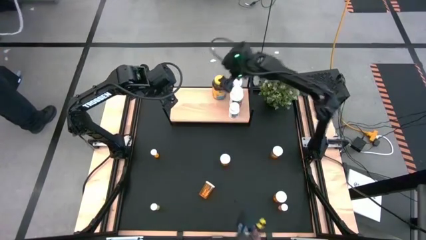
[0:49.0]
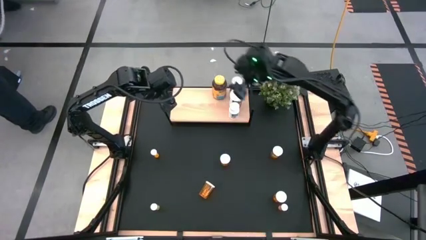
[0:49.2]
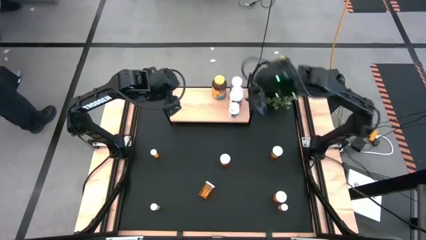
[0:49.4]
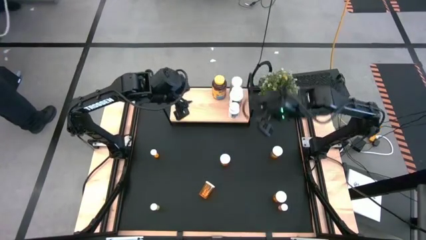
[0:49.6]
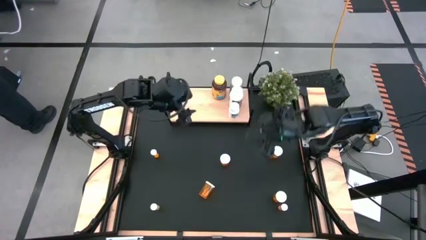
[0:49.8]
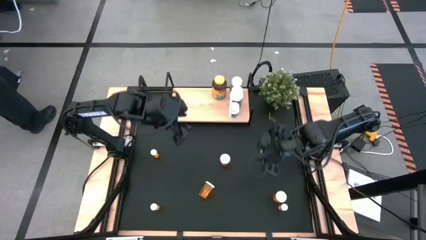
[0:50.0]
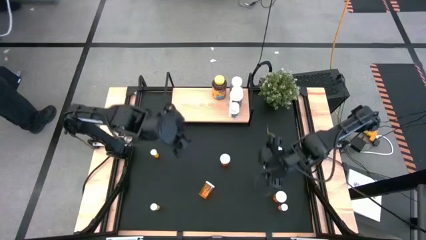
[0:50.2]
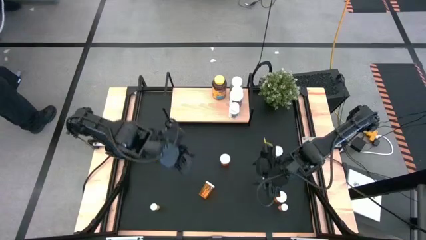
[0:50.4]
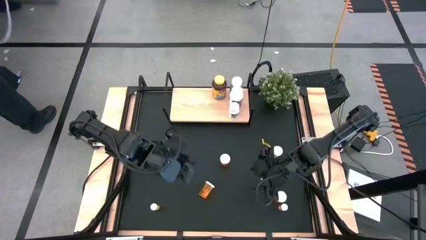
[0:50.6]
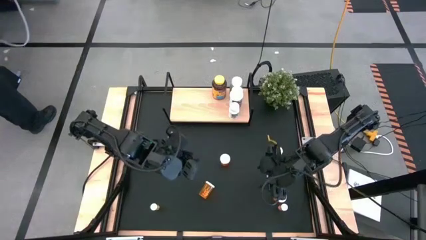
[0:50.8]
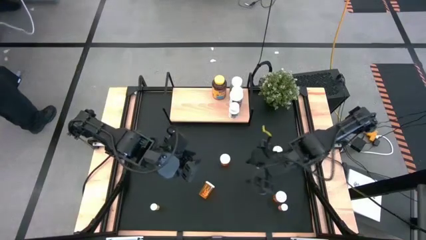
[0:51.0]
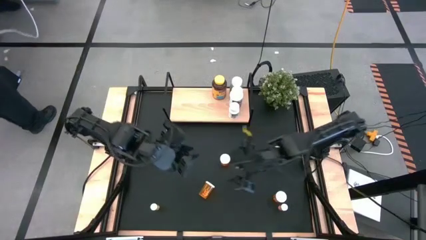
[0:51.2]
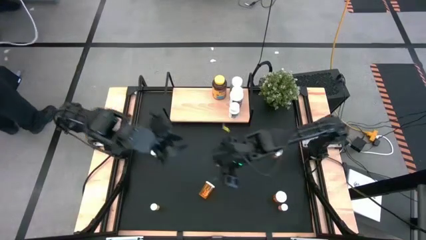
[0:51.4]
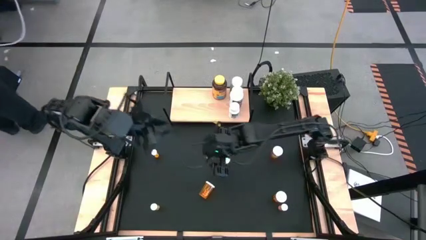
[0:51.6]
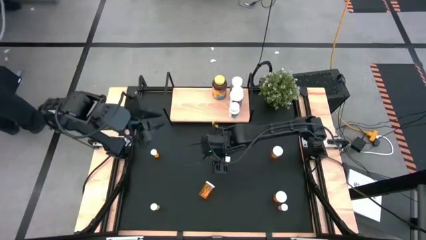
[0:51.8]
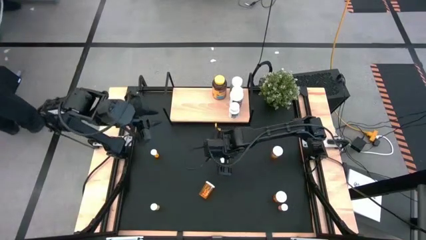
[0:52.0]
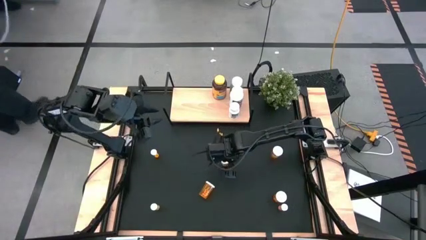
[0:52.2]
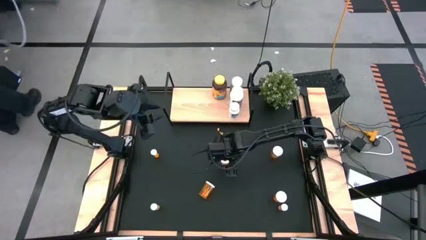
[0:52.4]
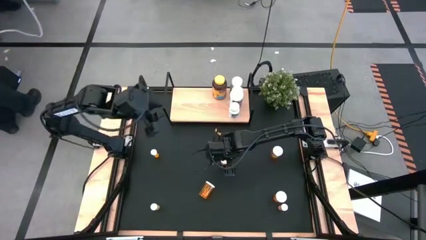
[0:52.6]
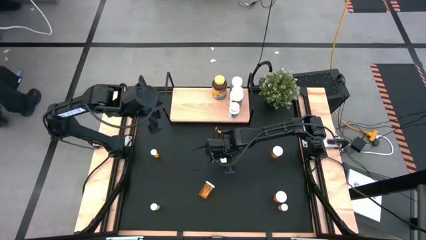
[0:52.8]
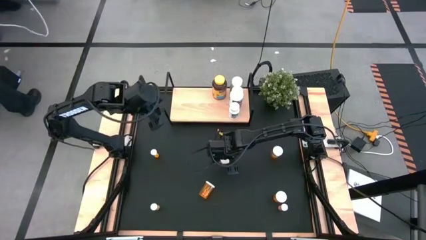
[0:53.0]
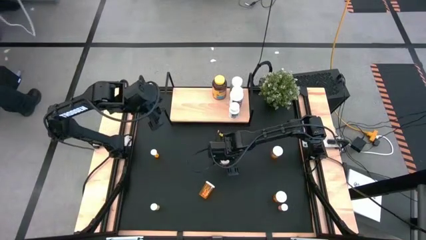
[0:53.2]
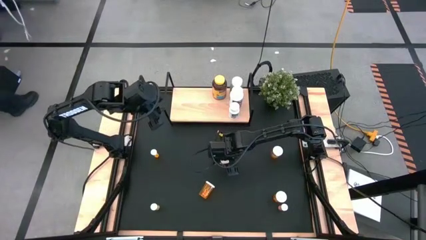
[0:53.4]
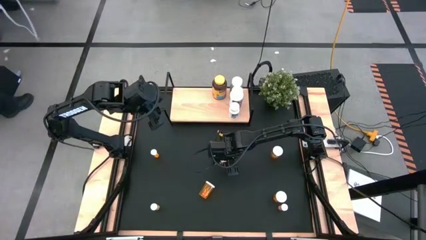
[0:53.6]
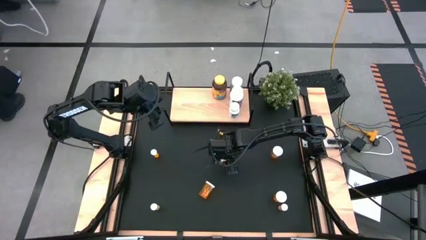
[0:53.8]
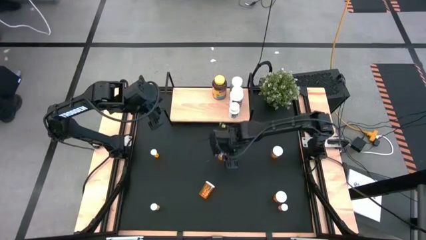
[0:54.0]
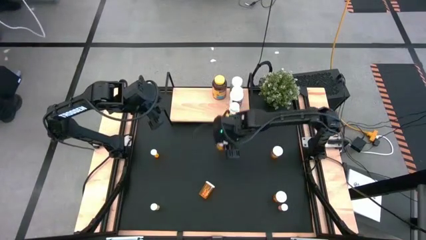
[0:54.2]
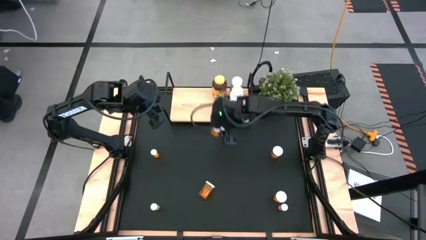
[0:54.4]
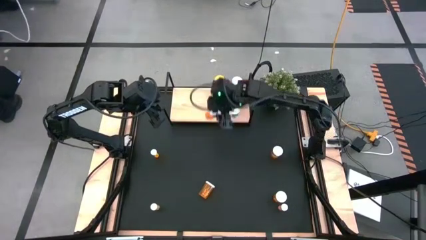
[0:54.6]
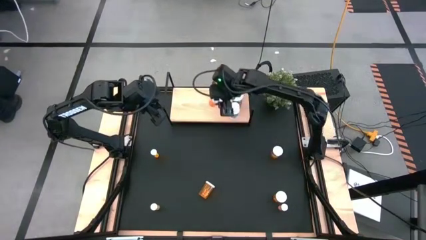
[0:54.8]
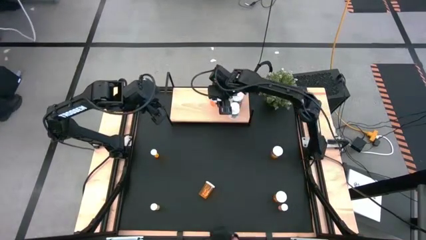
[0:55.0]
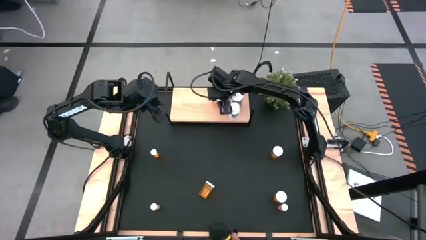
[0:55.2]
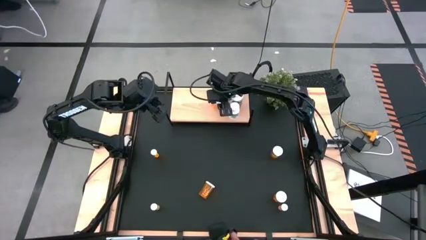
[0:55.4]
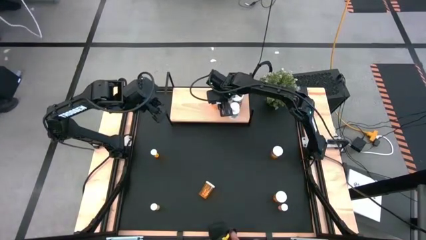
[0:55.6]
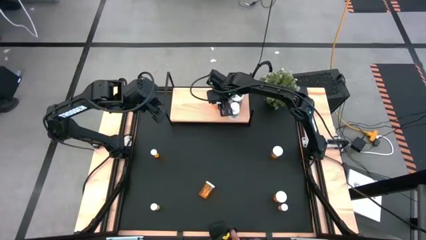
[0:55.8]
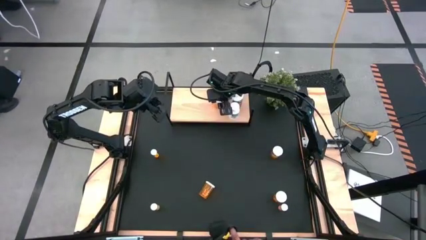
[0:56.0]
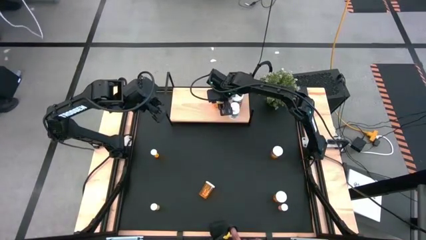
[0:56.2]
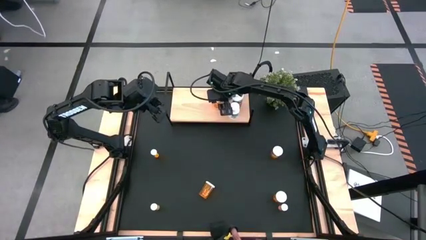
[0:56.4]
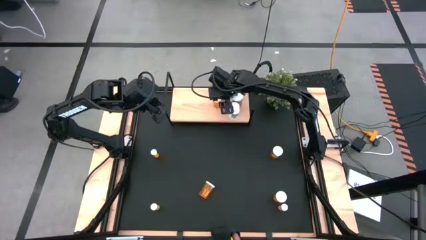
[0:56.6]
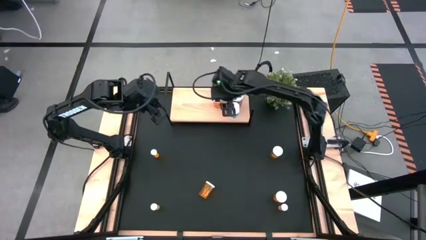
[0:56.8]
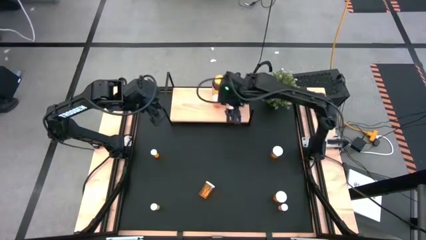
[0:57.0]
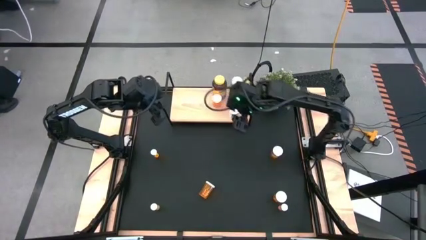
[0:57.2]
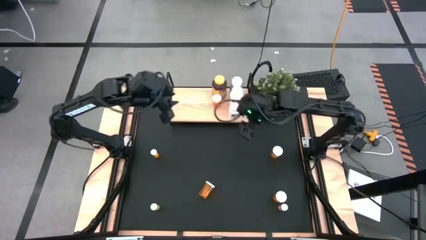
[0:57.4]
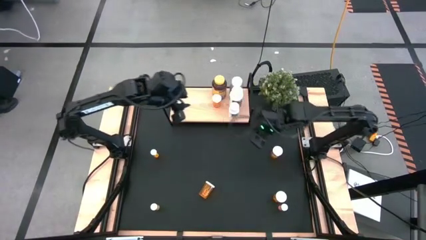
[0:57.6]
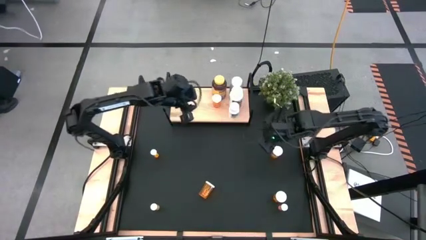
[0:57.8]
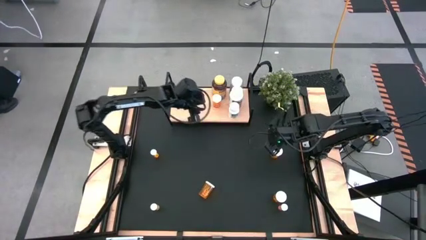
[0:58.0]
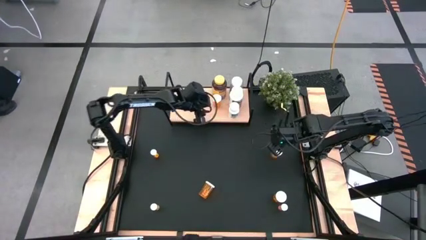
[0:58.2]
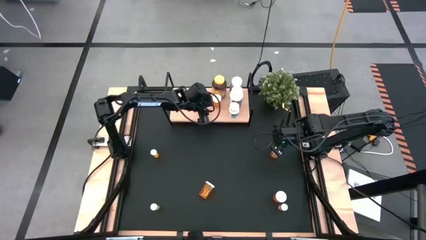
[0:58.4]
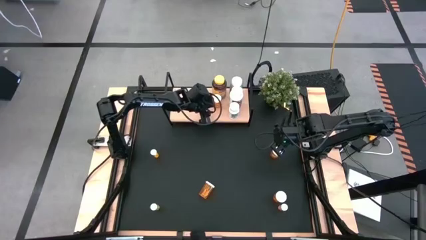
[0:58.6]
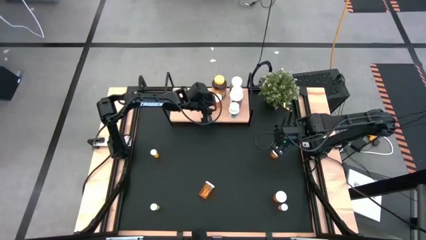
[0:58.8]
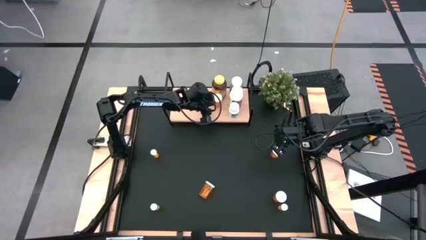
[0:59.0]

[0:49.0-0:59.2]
Task: Pick and place medicine bottles onto shelf by color
Put the orange pill bottle on the shelf aligned with the other yellow pill bottles

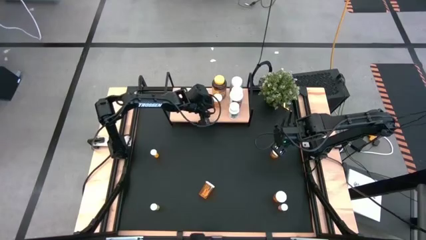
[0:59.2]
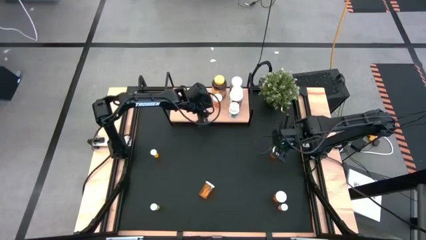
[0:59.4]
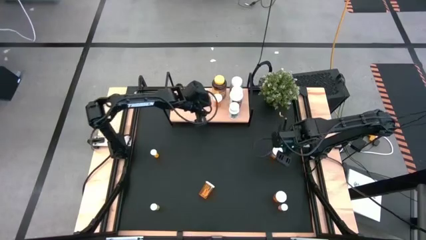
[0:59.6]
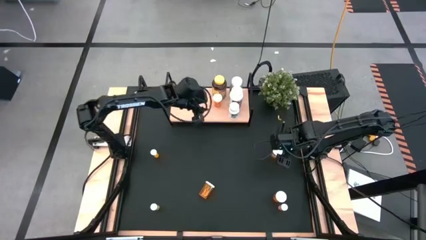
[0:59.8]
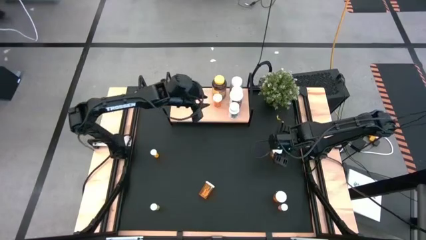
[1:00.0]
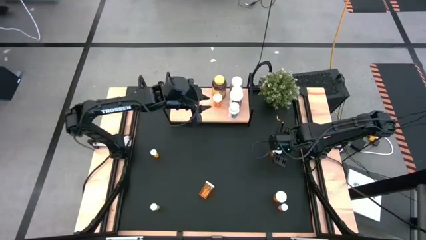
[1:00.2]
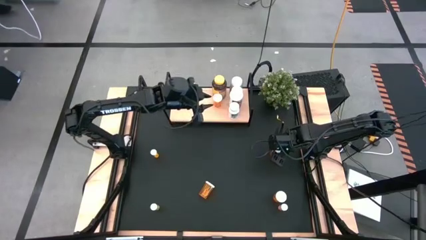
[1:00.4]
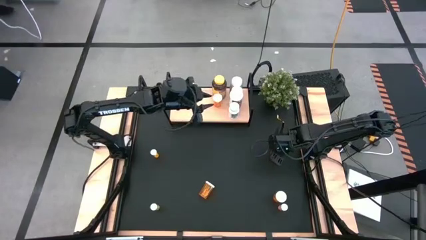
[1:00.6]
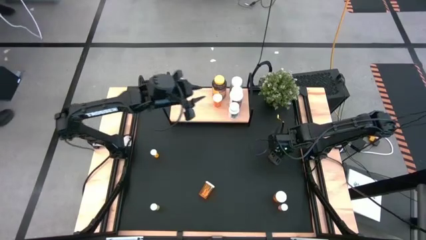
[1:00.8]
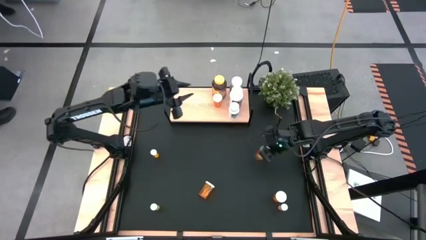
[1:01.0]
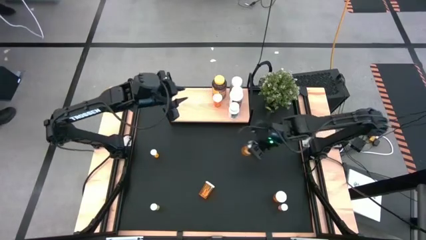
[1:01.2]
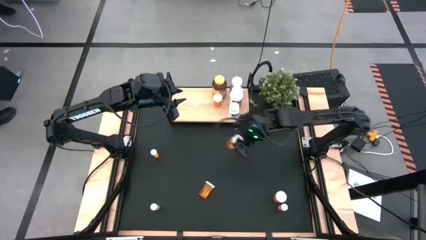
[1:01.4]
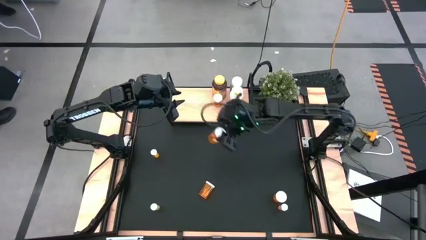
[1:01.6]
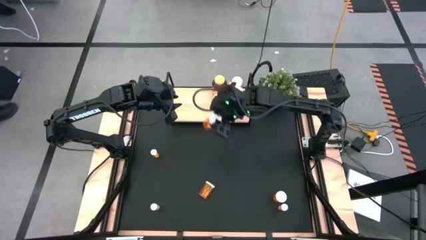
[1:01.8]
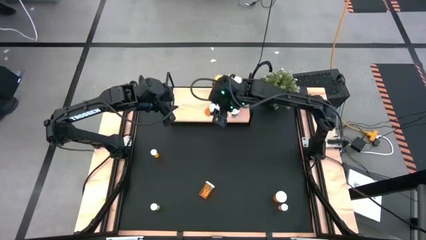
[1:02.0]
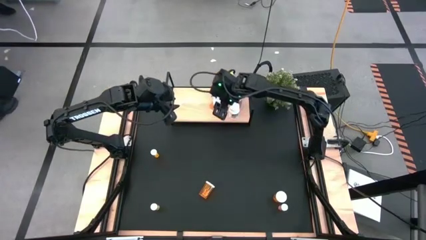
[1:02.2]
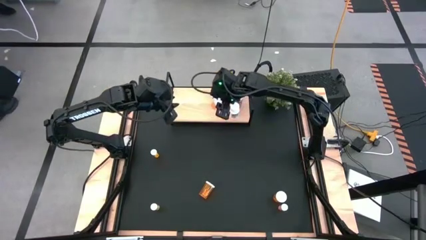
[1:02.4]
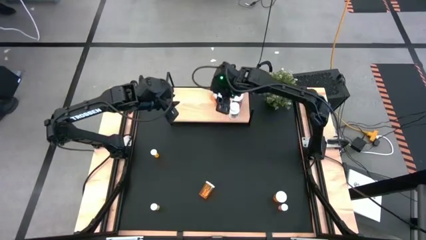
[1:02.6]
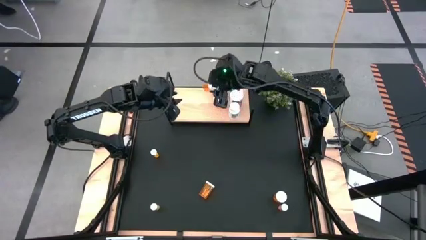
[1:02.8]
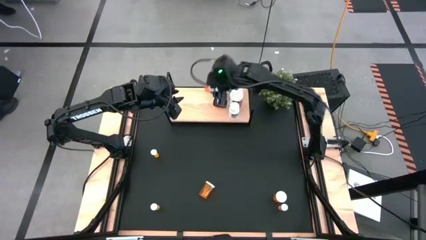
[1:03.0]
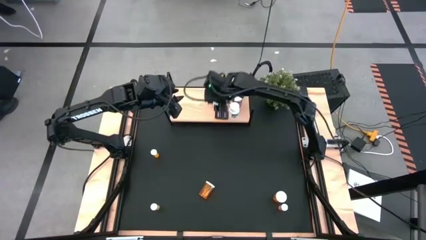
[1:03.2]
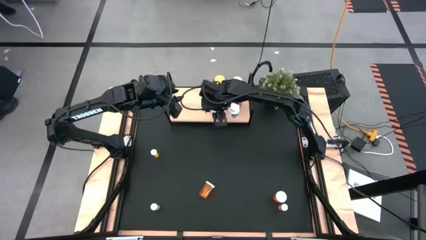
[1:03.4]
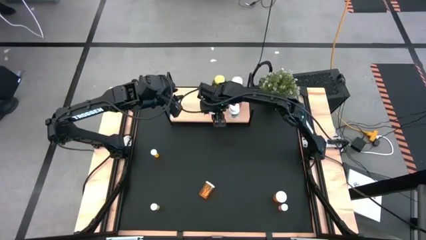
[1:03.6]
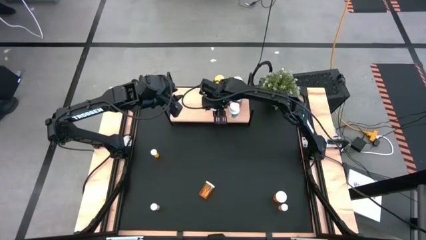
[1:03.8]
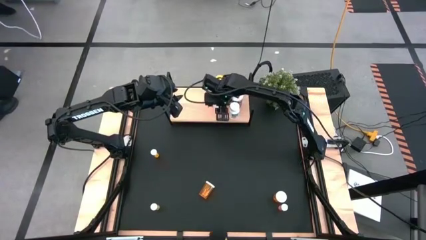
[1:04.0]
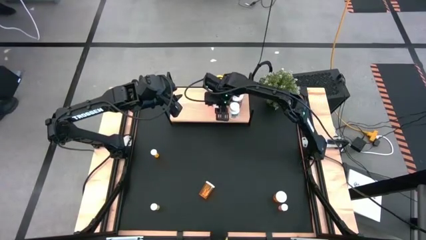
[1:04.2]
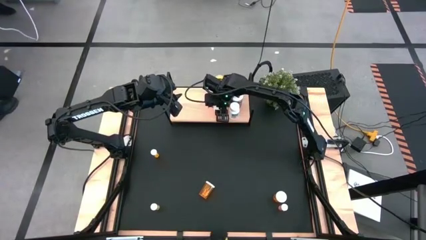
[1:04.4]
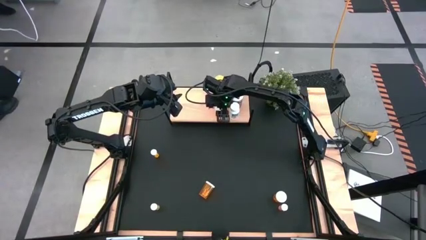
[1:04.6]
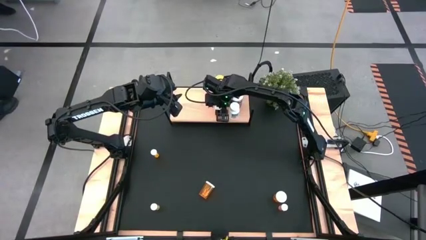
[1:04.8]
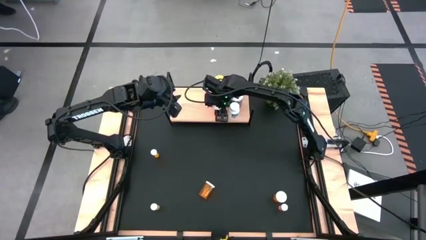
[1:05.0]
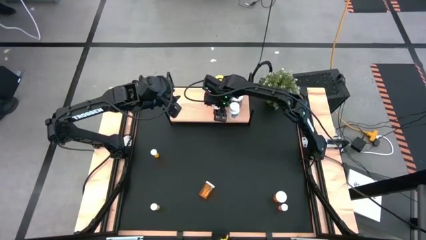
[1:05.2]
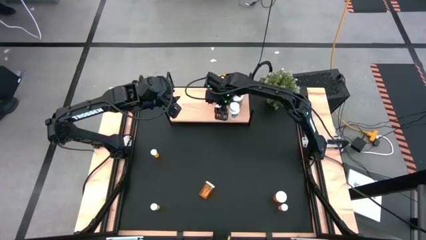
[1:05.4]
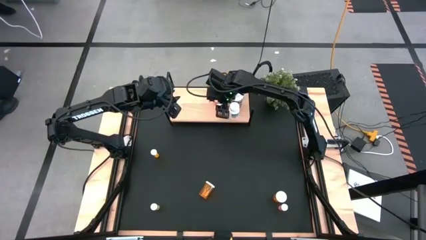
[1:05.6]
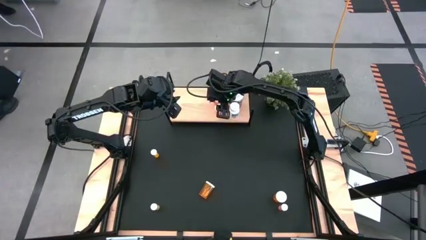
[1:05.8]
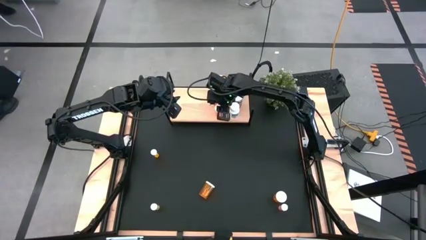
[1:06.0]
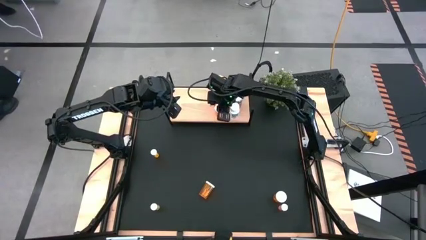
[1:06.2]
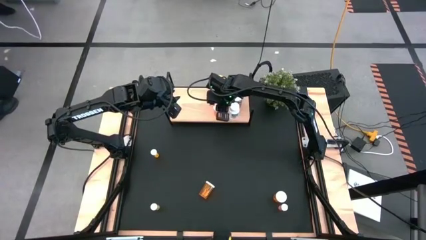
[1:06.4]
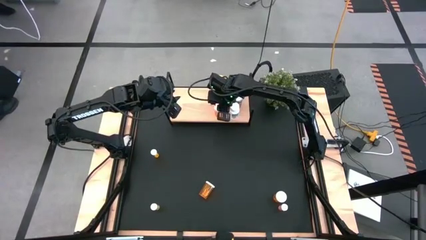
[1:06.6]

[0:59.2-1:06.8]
Put the orange pill bottle on the shelf aligned with the other orange pill bottles
